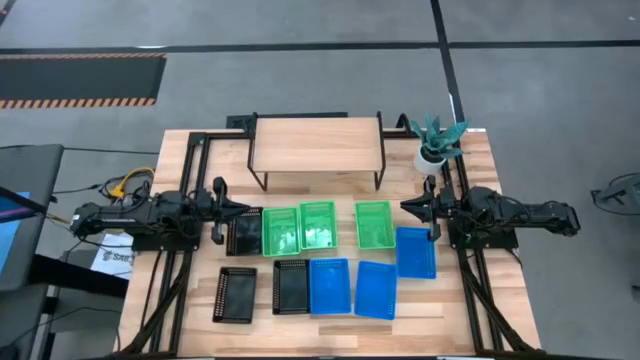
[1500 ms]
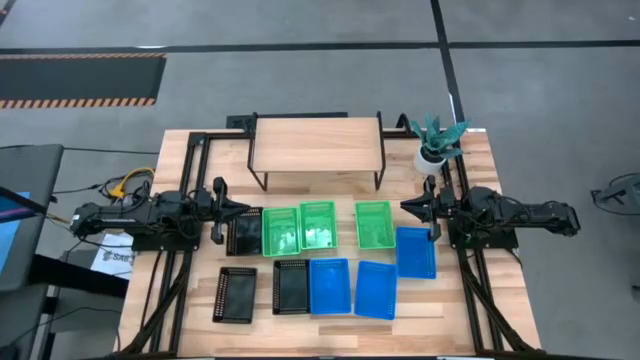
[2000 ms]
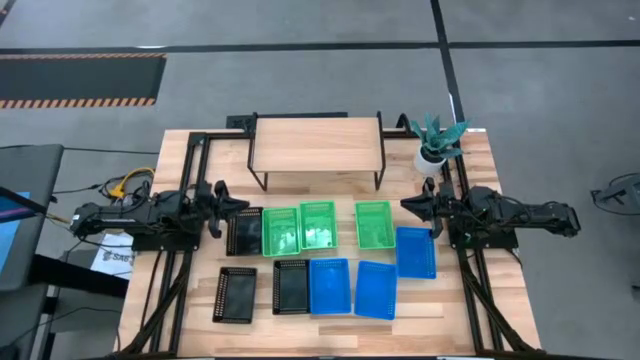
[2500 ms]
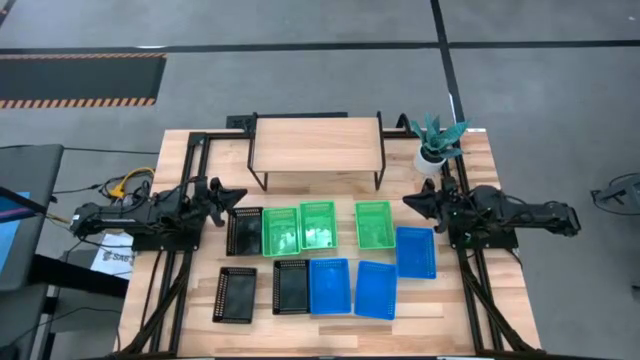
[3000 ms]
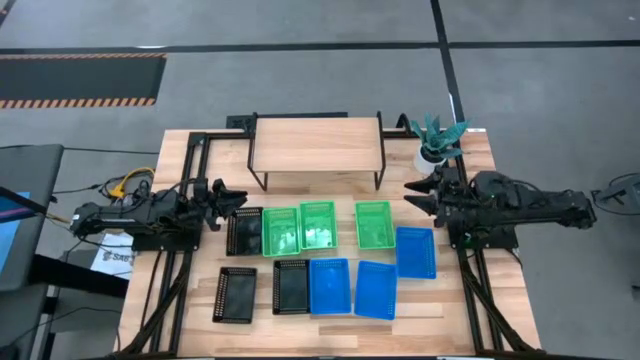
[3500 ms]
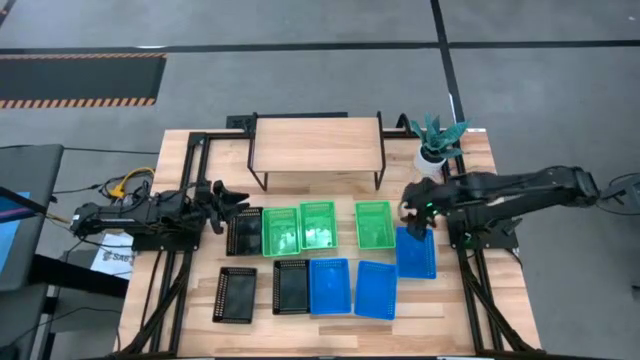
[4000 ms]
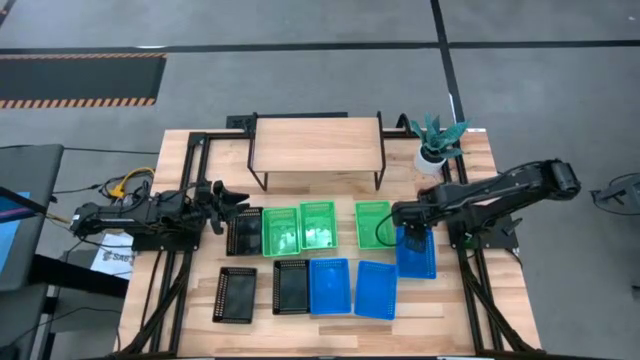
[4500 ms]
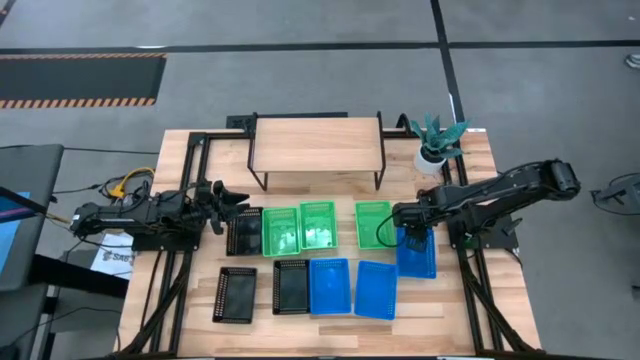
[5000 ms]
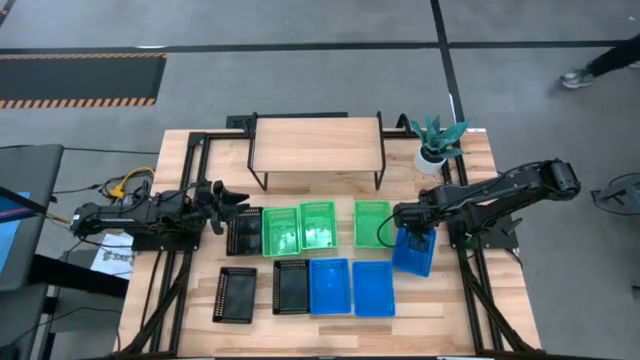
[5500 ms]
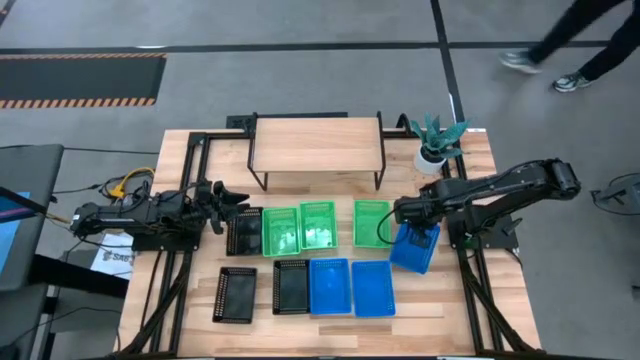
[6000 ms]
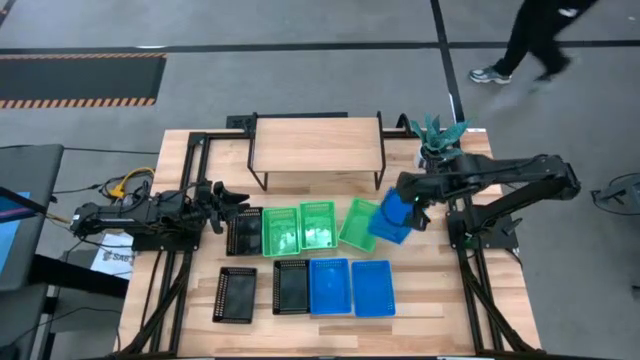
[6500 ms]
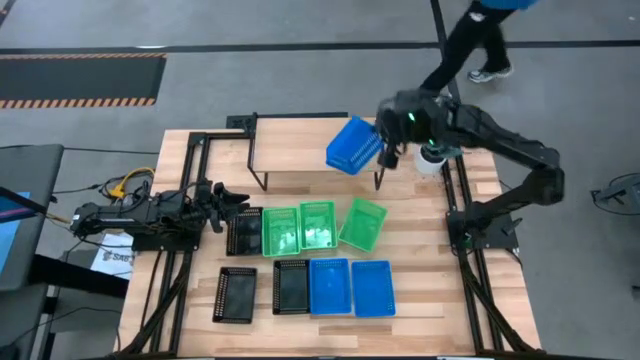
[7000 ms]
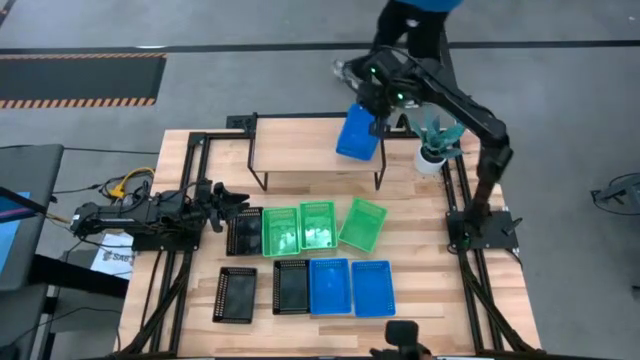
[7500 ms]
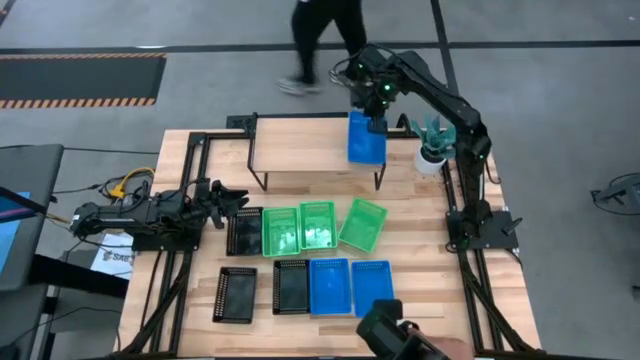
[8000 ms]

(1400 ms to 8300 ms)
Task: Stack baskets on shelf by color
Put the right blue bin on the shelf

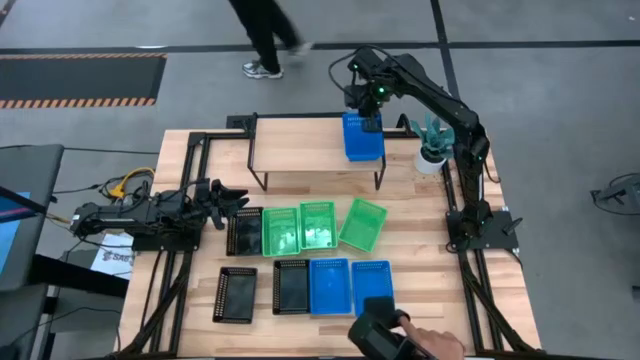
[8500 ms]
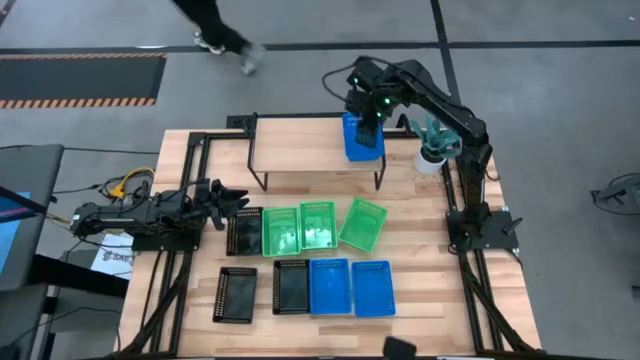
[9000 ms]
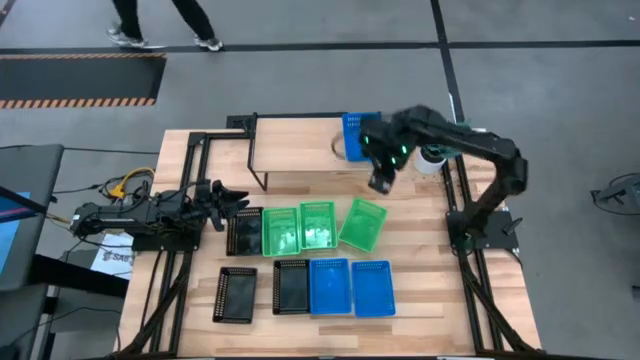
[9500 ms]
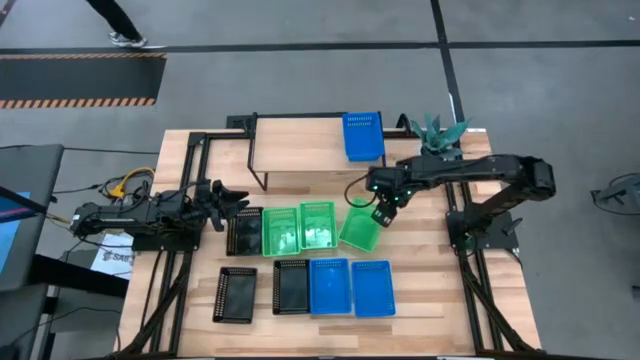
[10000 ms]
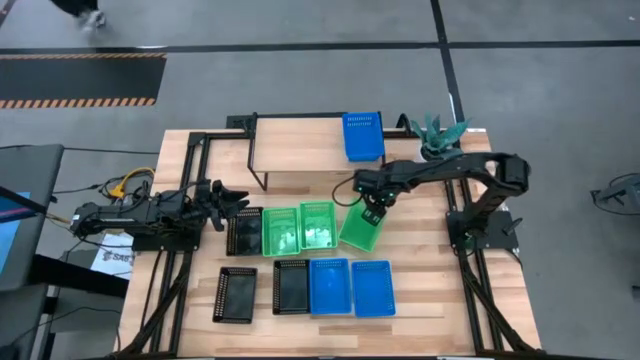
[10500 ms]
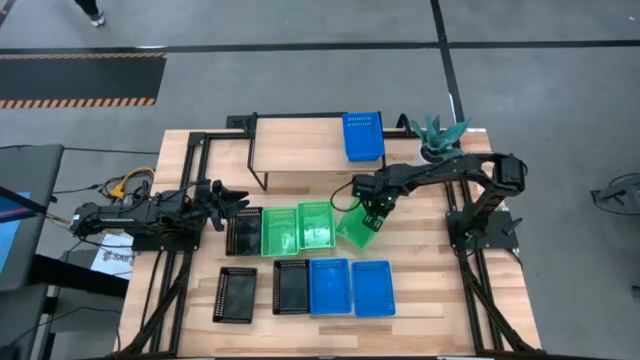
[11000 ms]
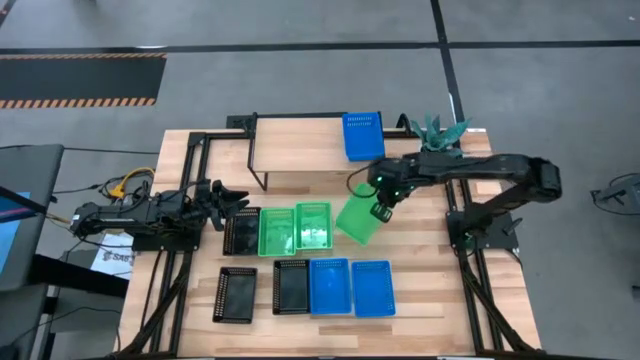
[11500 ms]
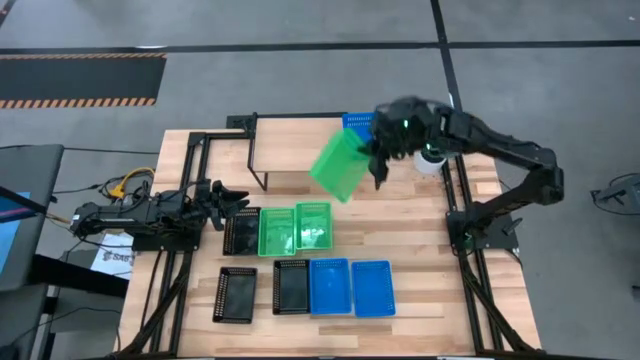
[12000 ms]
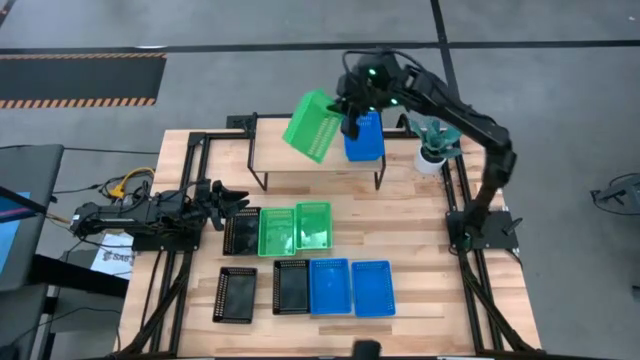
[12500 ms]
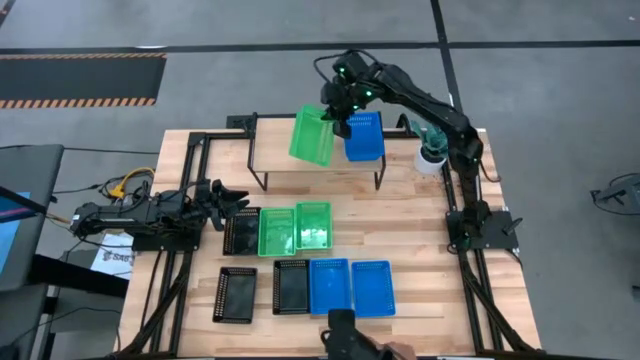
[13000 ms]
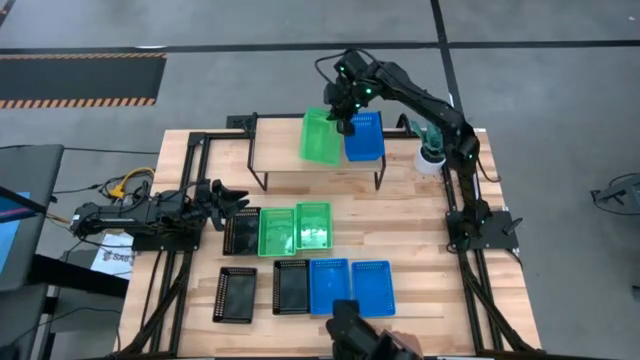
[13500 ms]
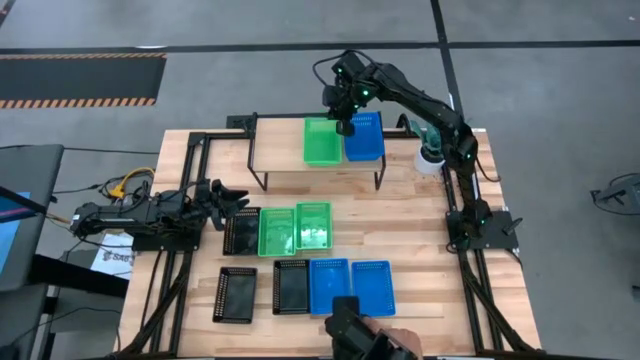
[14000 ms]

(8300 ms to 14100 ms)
Put the right green bin on the shelf

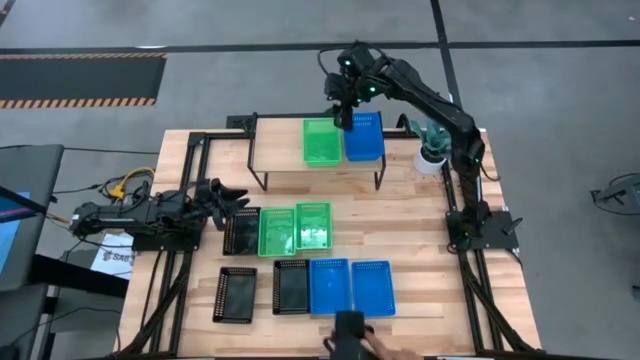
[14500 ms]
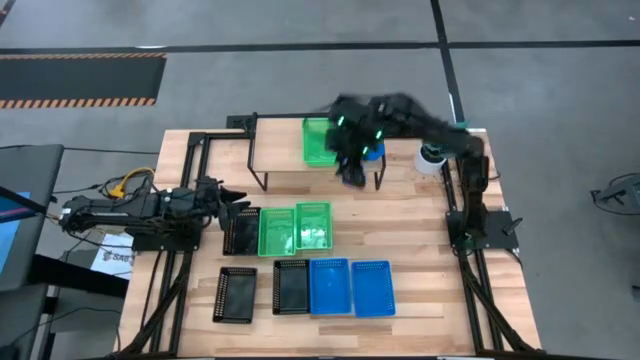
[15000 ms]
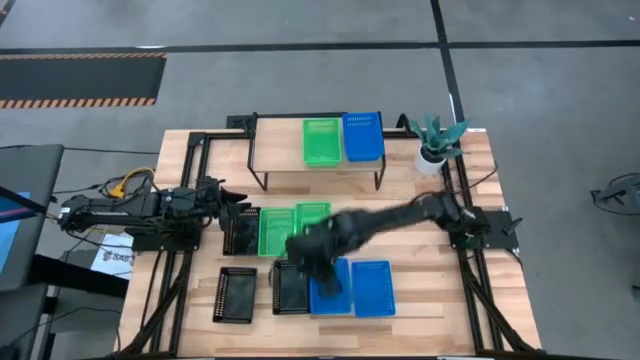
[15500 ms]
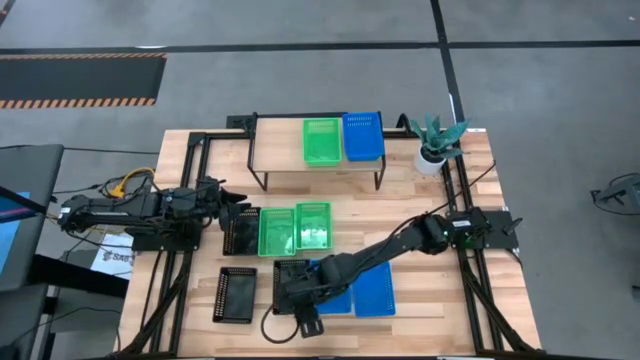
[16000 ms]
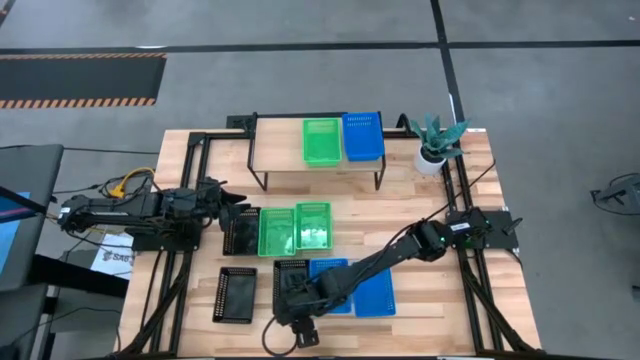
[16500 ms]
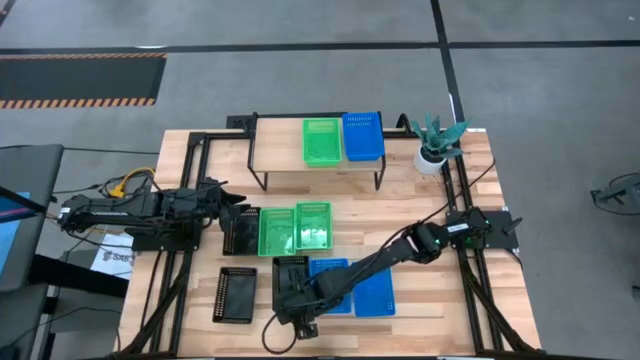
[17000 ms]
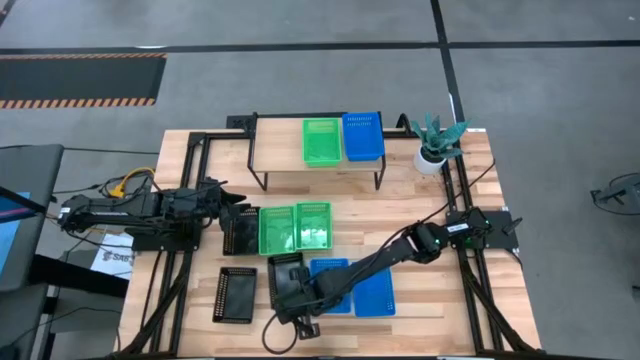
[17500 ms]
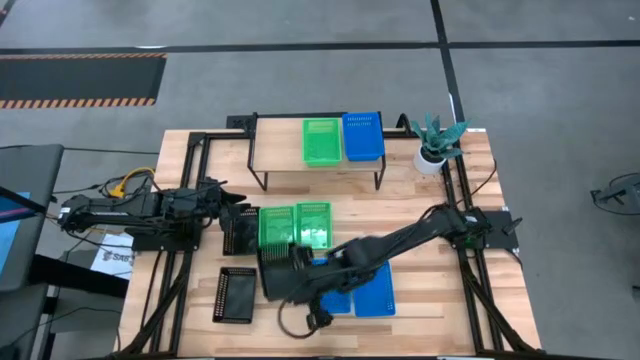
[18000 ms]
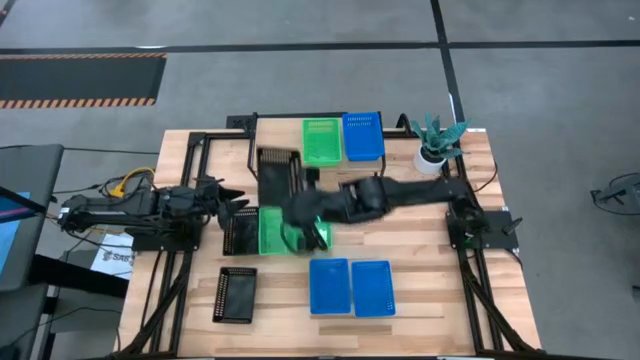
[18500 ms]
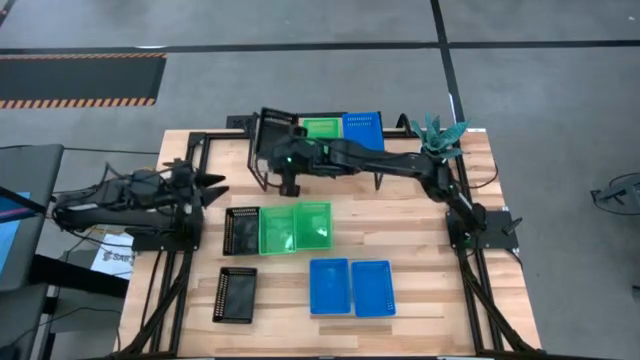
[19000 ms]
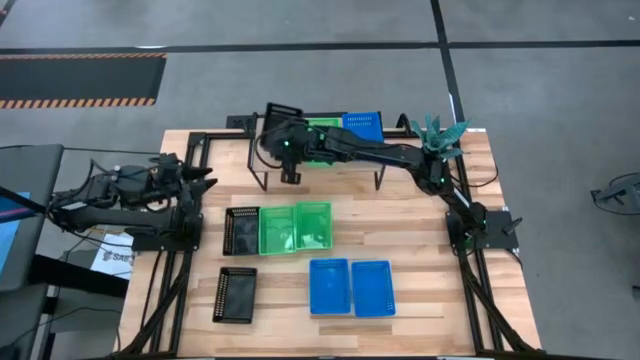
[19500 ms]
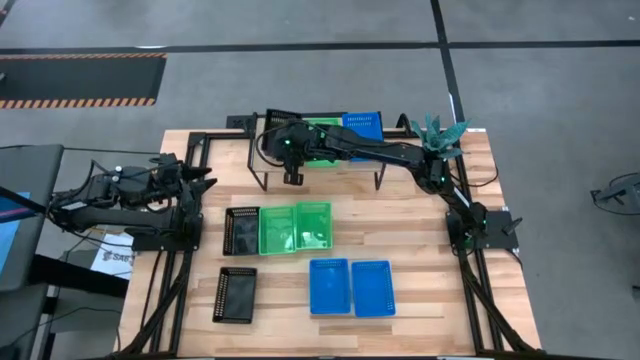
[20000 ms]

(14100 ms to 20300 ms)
Put the bottom right black bin on the shelf
